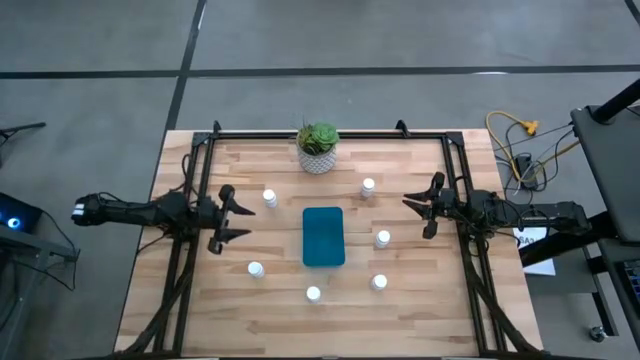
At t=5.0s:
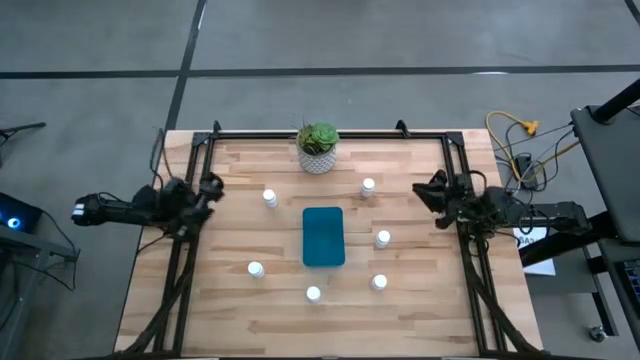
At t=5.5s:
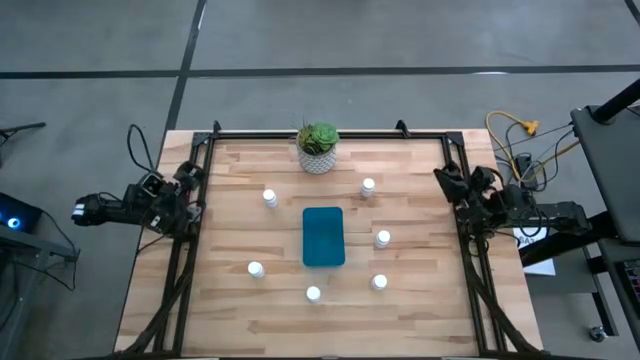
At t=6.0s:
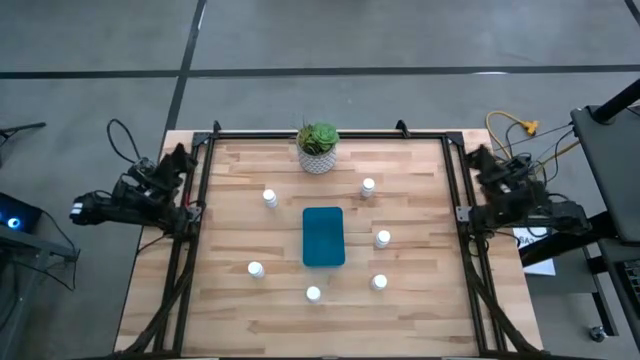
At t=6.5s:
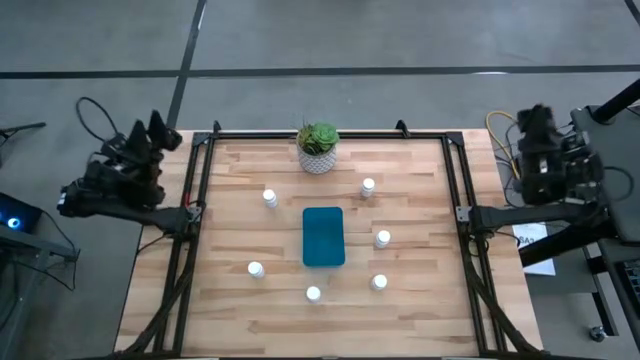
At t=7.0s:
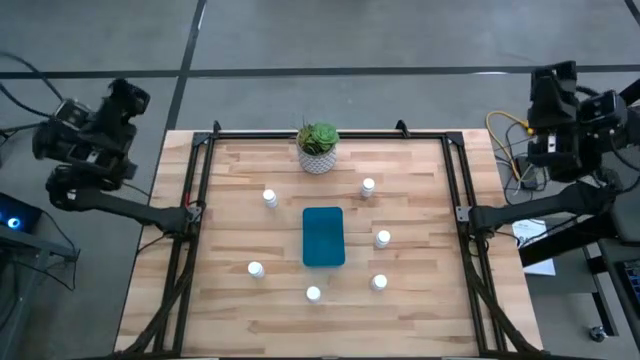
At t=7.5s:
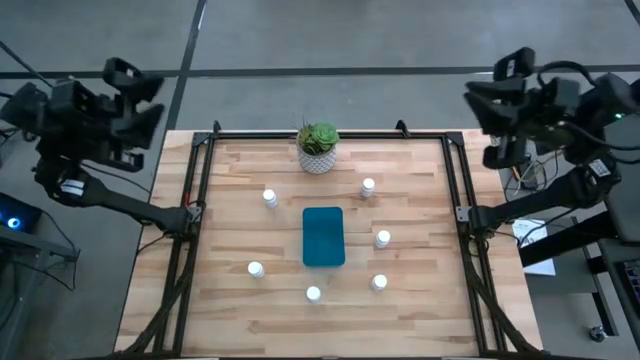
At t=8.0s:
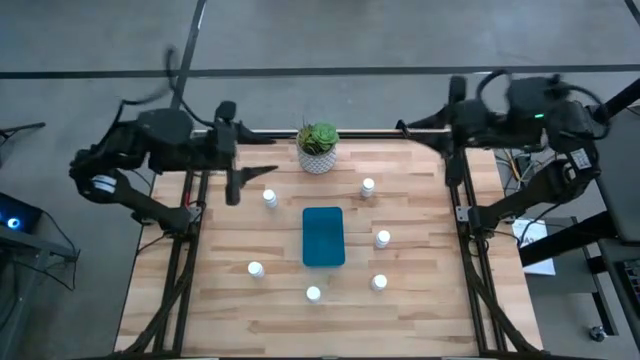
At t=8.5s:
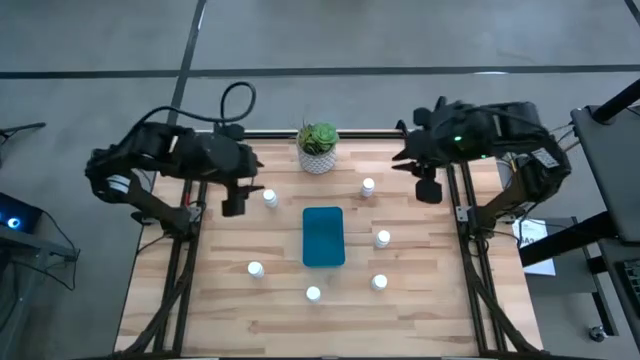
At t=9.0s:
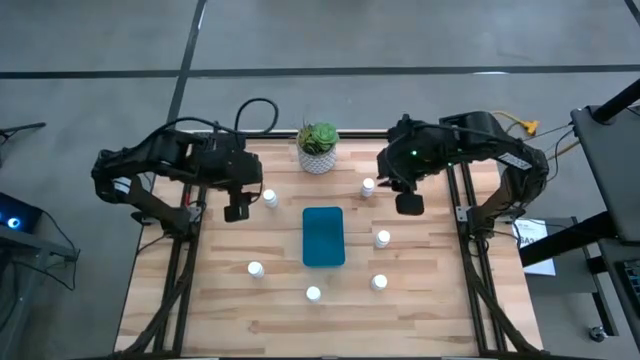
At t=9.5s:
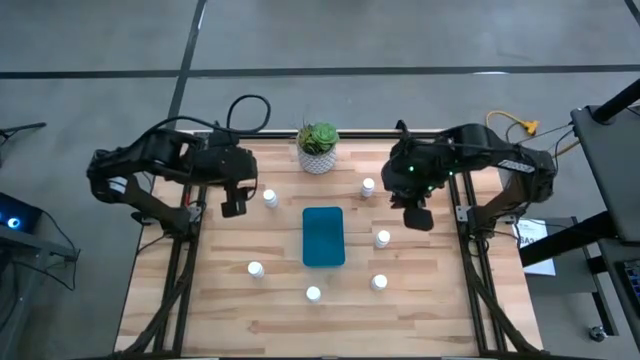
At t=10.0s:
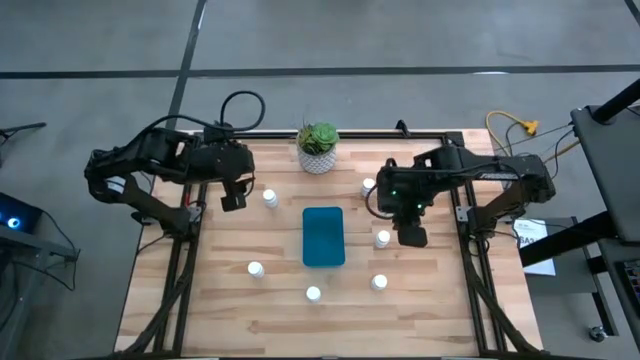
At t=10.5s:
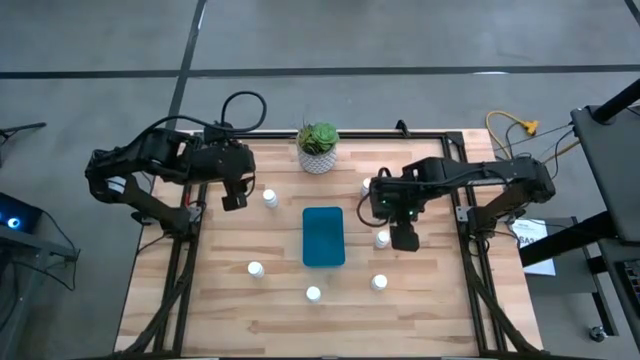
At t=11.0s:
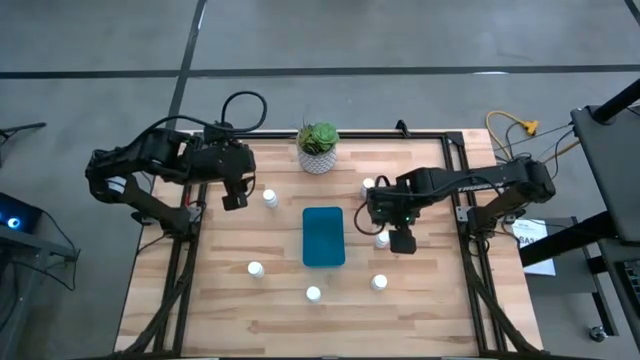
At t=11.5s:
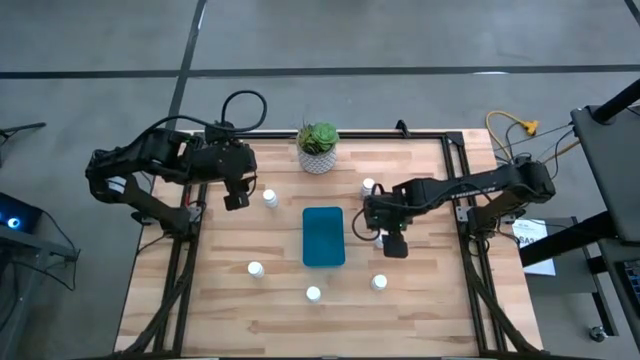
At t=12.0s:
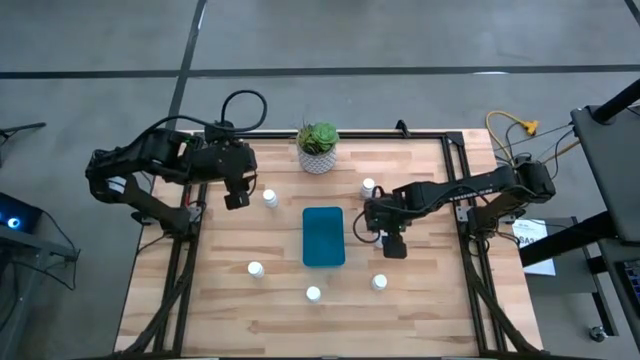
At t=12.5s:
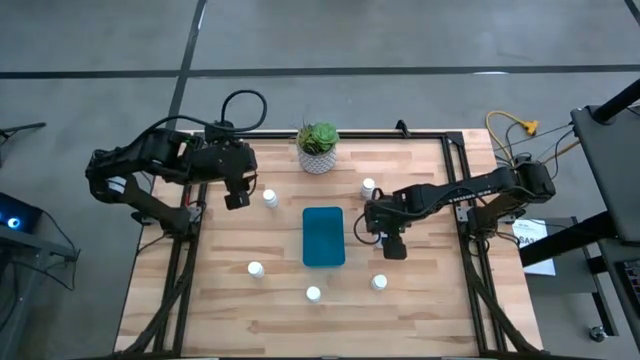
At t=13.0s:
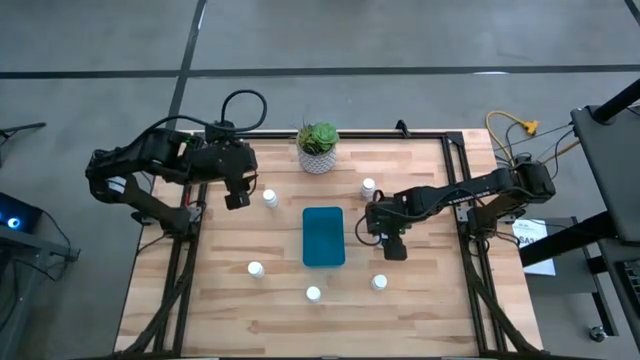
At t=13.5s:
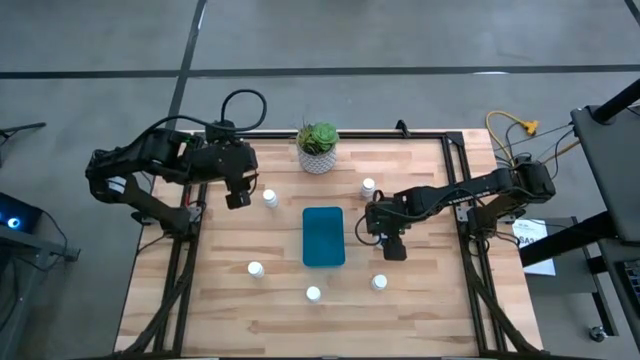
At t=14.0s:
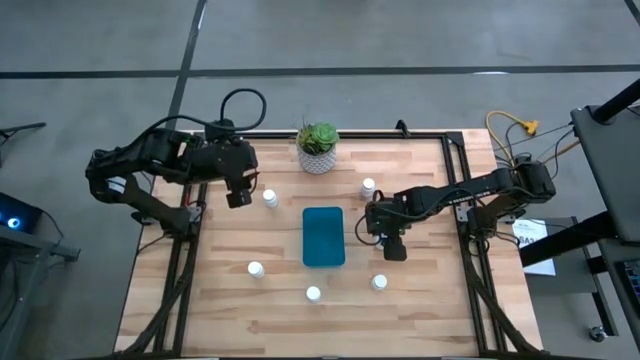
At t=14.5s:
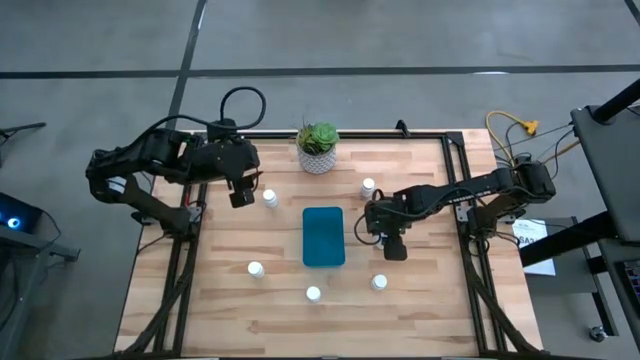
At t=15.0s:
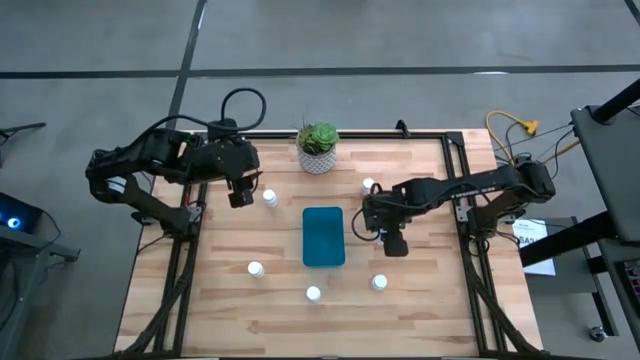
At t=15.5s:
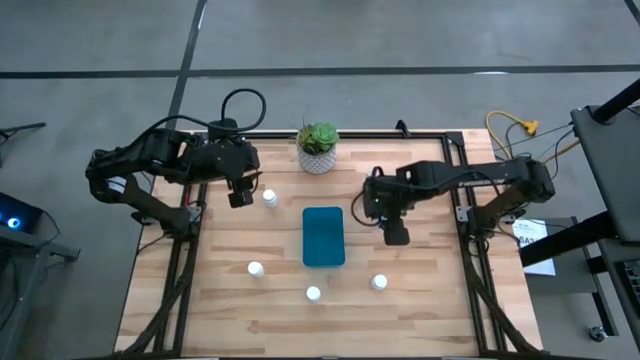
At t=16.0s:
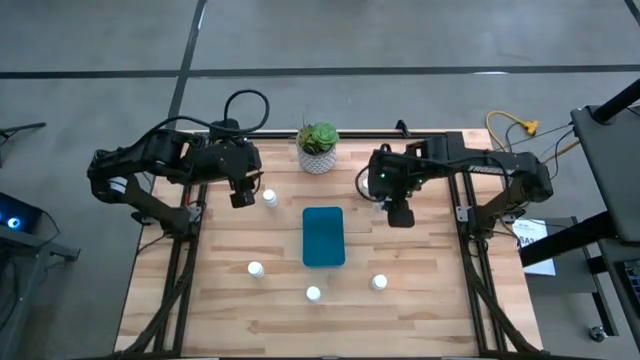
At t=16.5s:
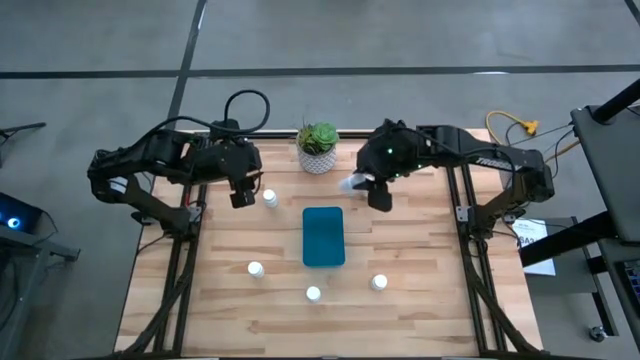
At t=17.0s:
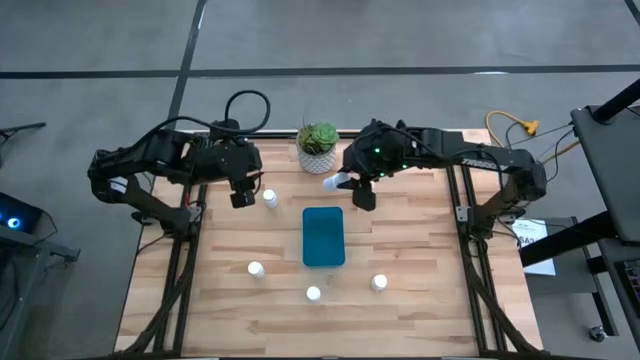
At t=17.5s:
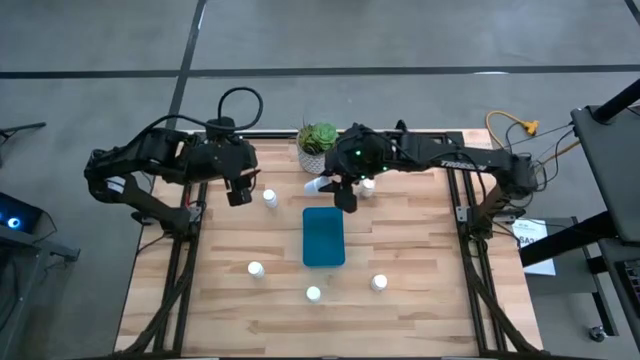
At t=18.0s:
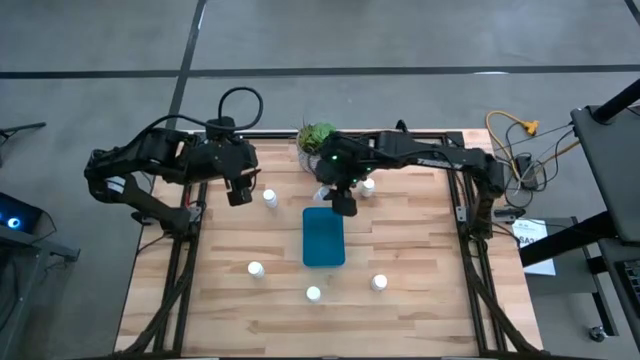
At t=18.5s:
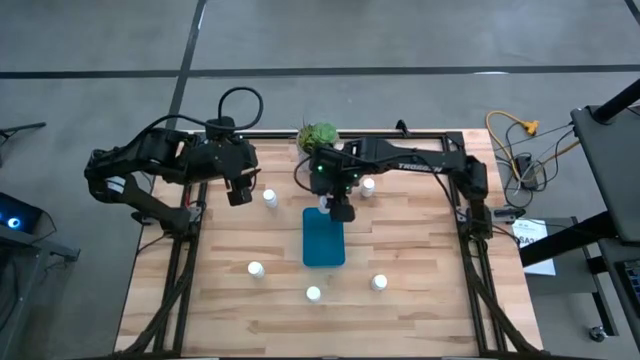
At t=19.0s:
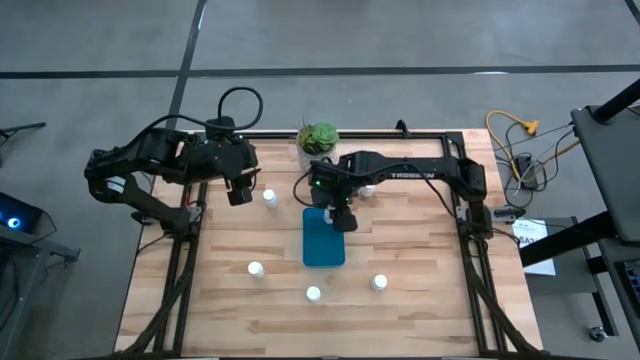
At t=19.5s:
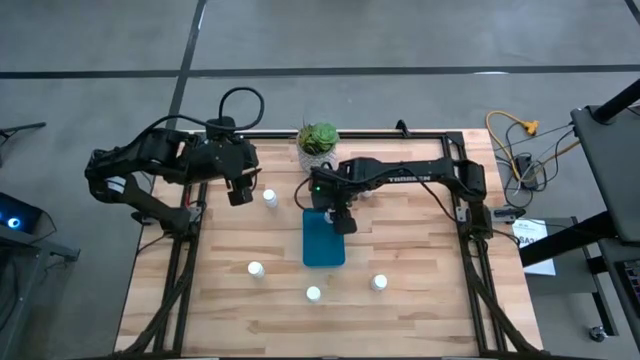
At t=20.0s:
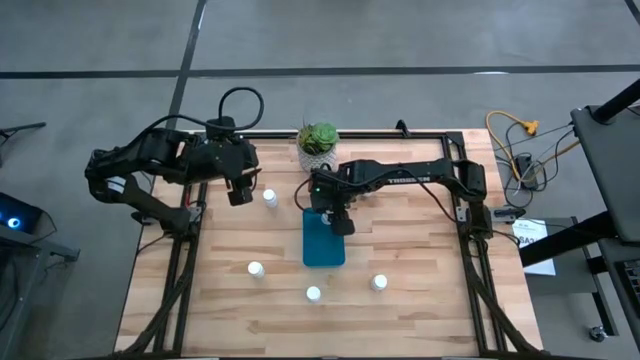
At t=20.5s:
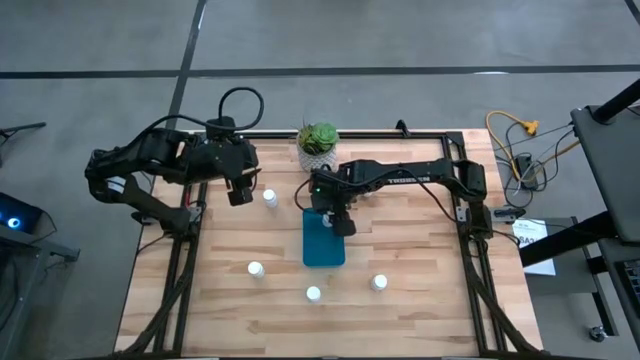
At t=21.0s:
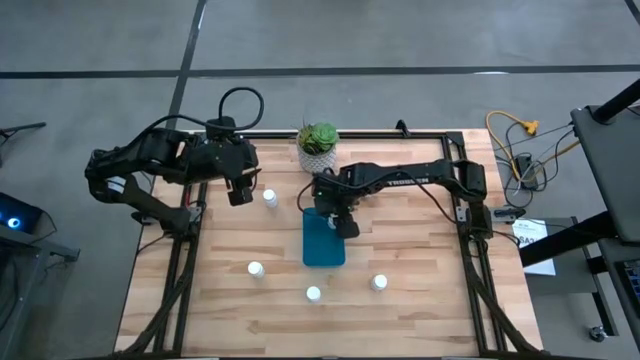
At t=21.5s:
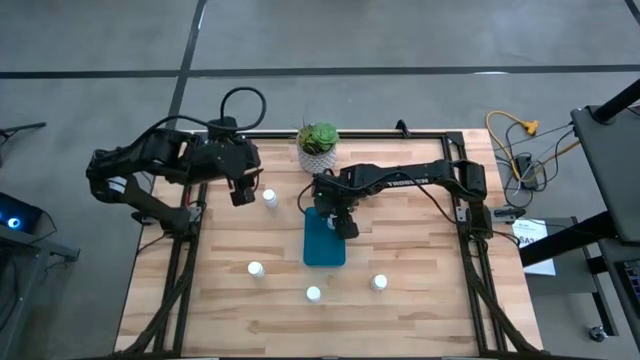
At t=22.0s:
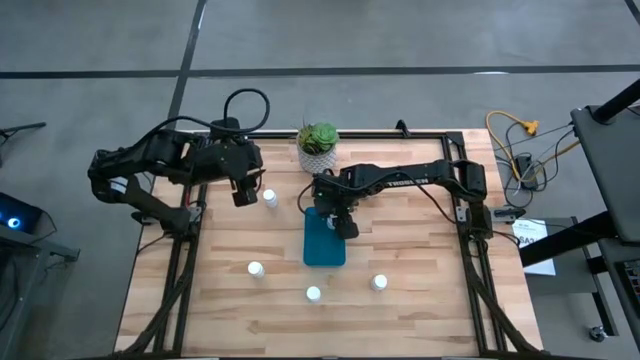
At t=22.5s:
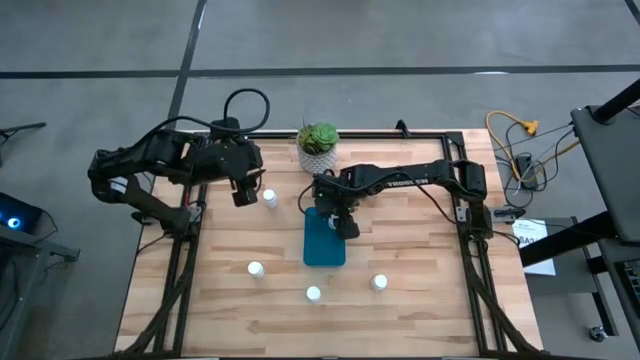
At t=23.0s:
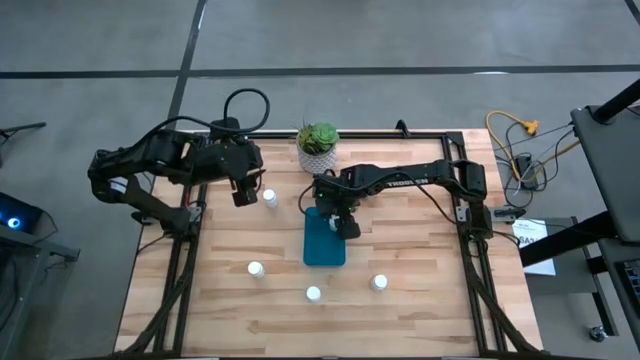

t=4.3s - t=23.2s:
Task: Pick and place pill bottles into a basket
Put the white medicine bottle into the blue bin

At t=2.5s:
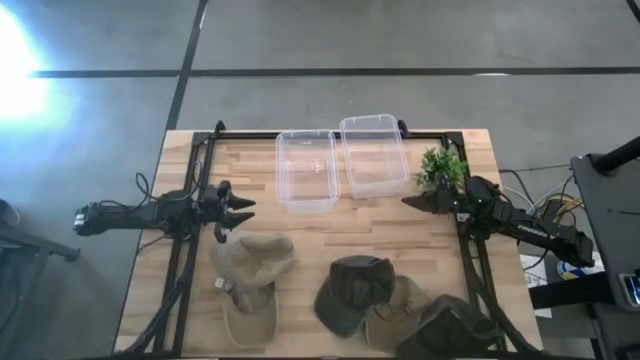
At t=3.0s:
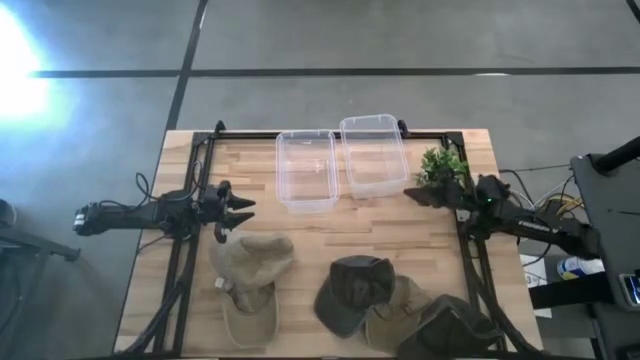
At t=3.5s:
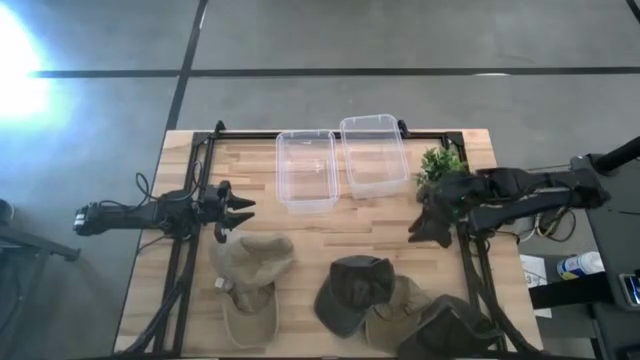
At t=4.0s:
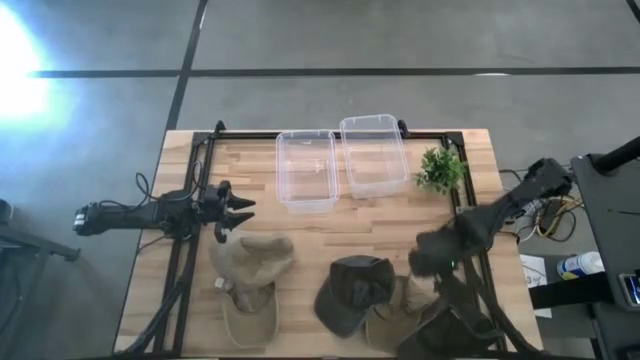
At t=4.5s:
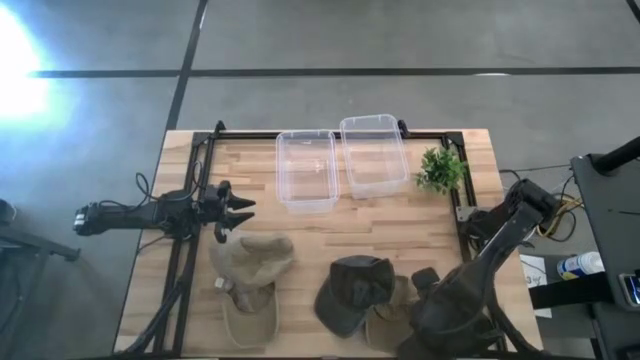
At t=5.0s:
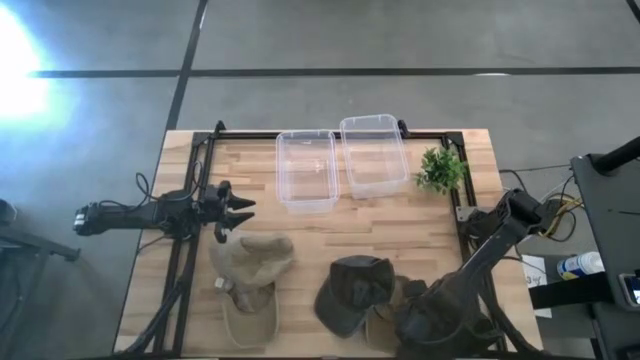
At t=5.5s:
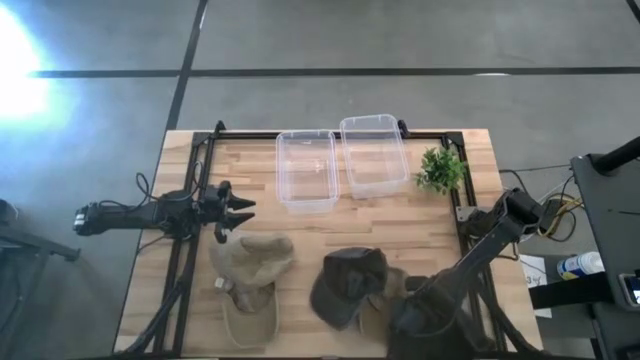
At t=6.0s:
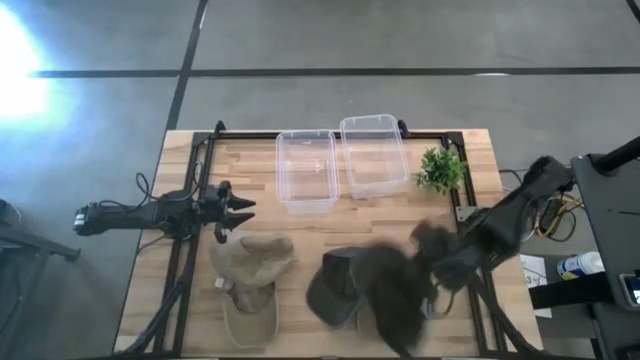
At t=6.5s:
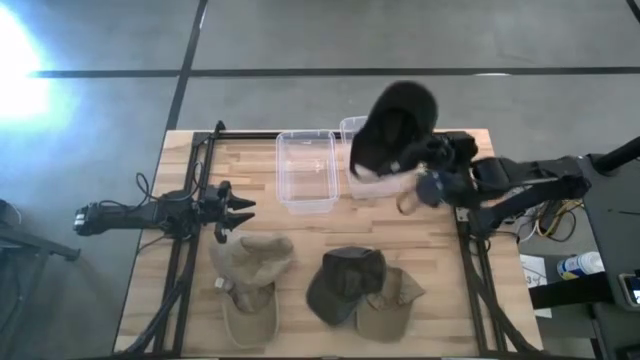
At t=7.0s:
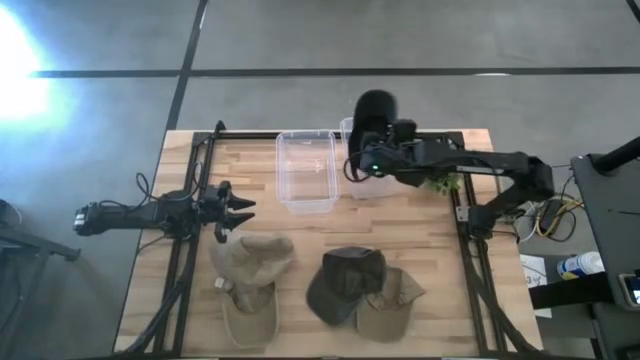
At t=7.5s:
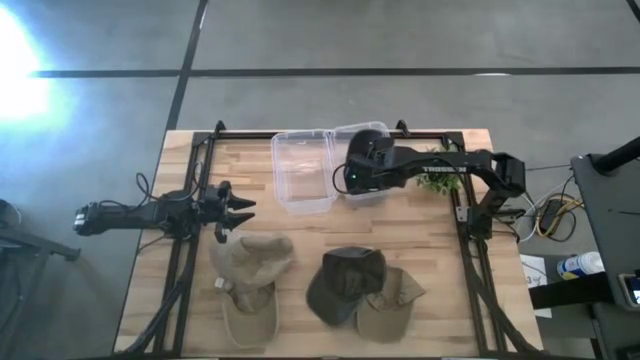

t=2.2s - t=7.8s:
Task: Pick & Place hat
Put the right blue cap into the right transparent bin
